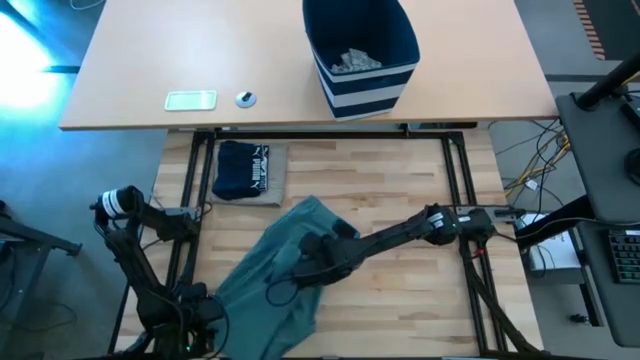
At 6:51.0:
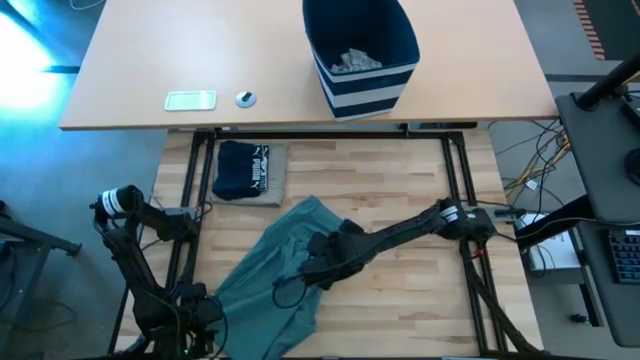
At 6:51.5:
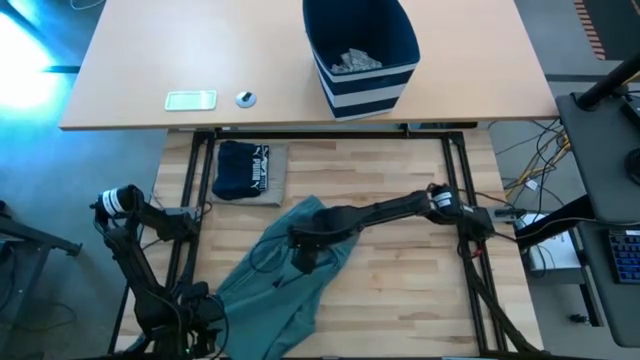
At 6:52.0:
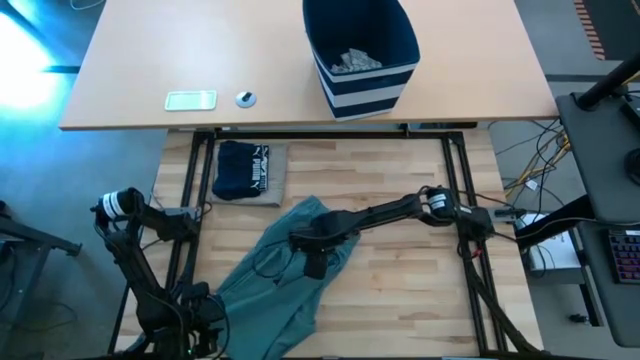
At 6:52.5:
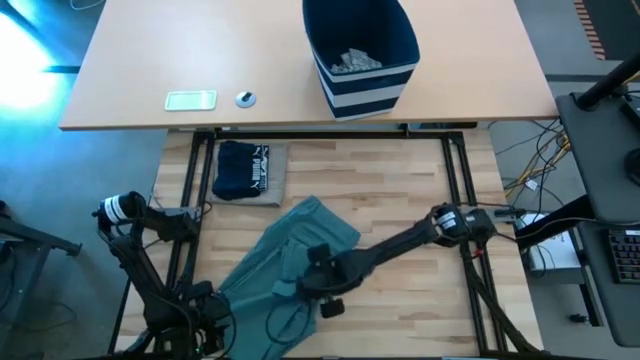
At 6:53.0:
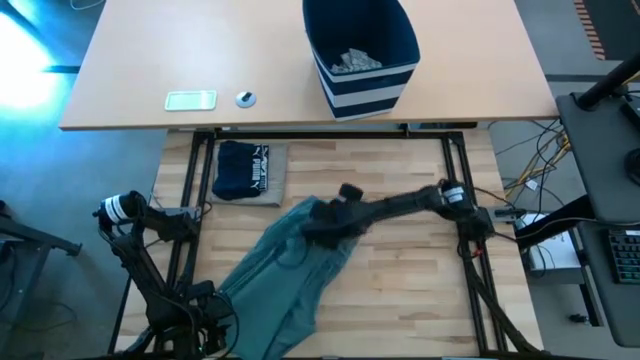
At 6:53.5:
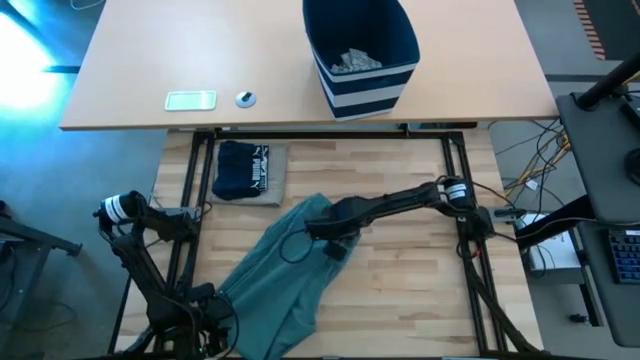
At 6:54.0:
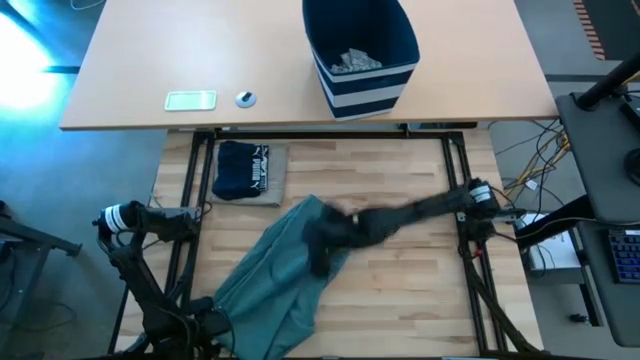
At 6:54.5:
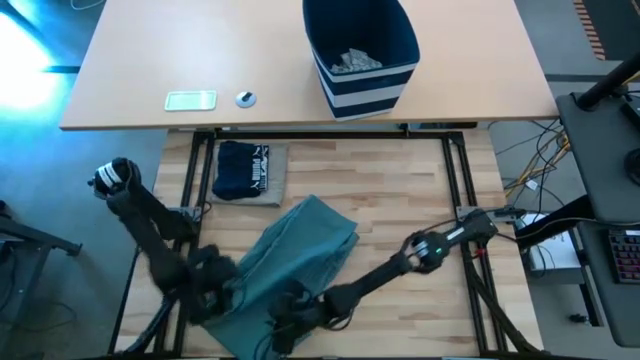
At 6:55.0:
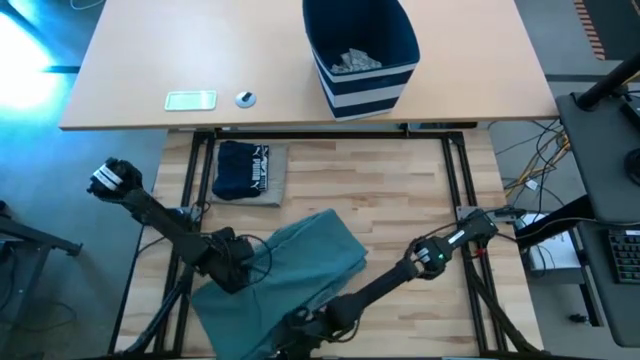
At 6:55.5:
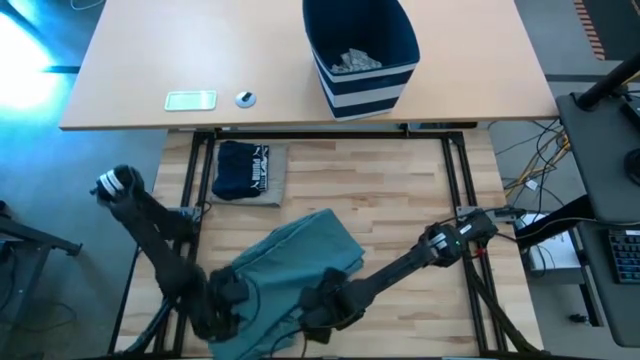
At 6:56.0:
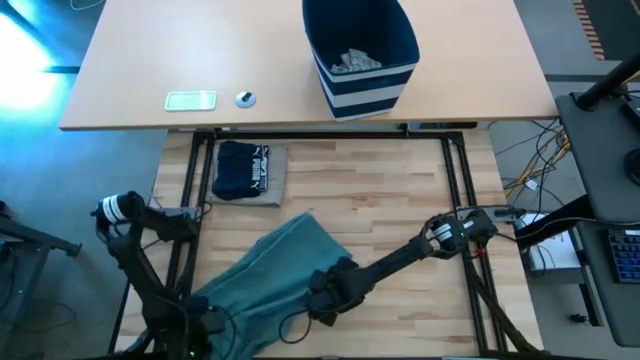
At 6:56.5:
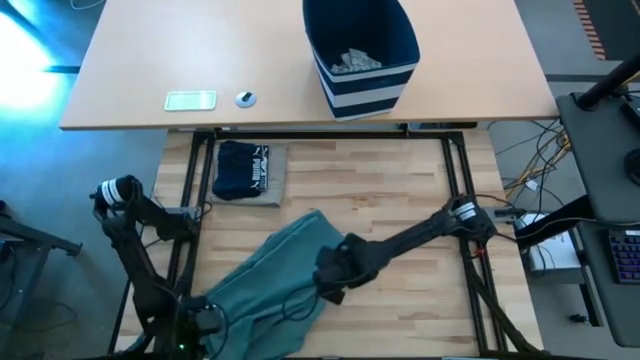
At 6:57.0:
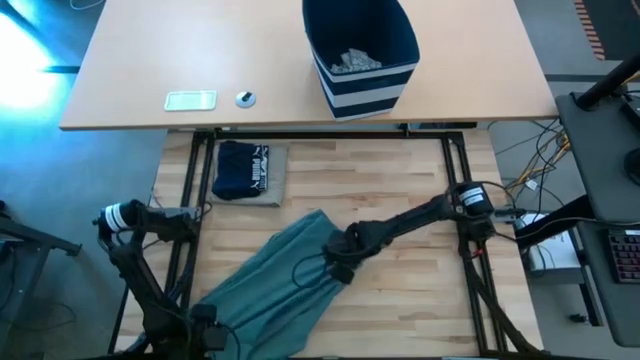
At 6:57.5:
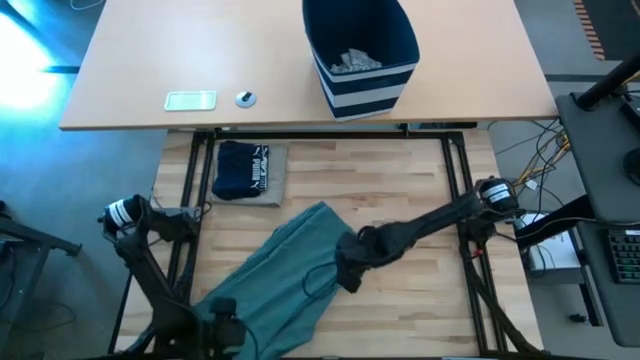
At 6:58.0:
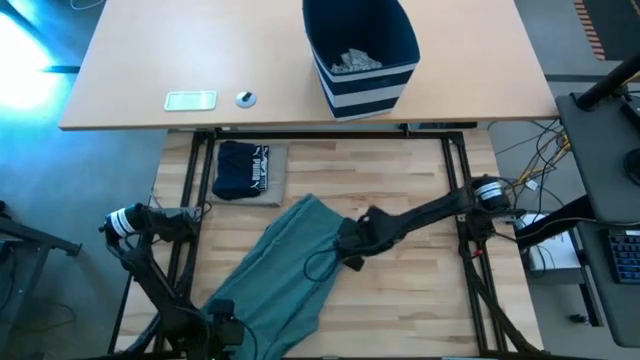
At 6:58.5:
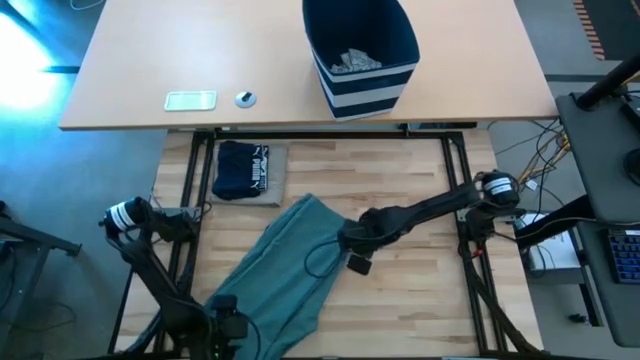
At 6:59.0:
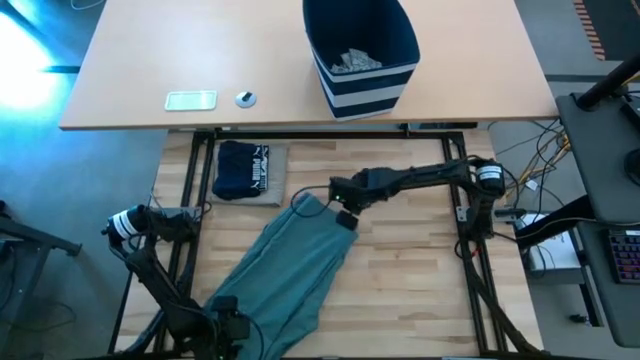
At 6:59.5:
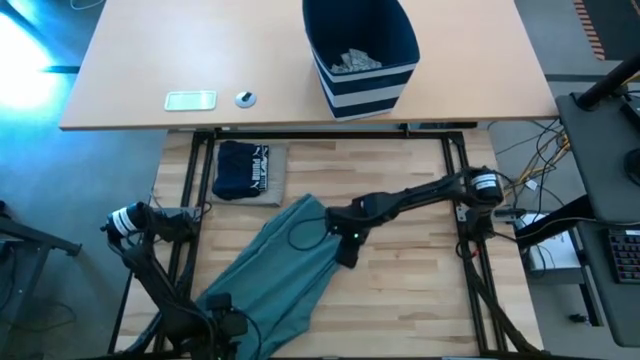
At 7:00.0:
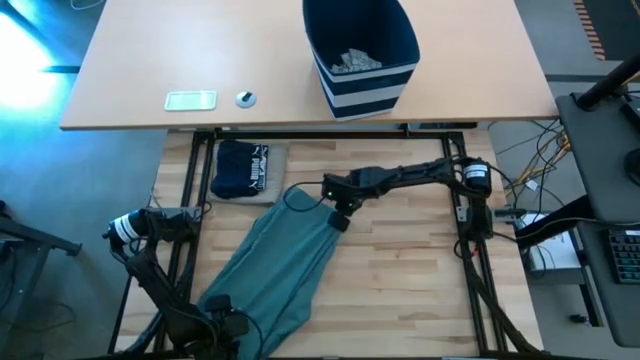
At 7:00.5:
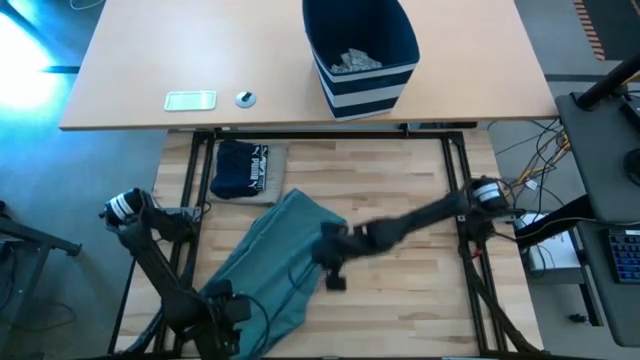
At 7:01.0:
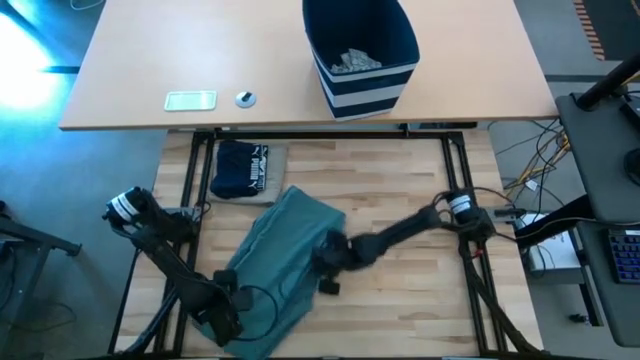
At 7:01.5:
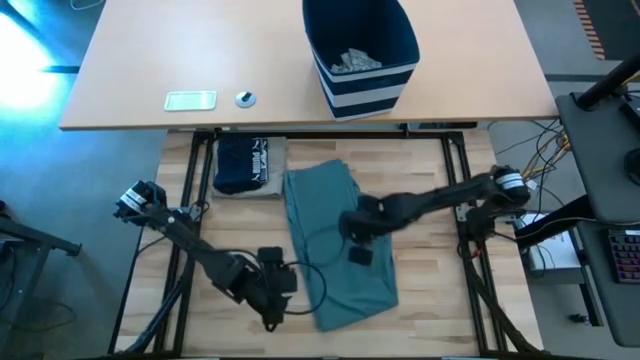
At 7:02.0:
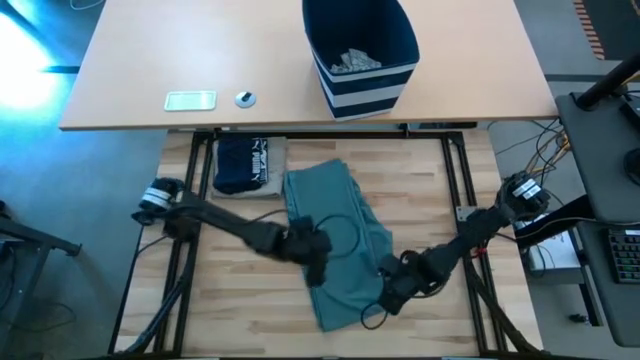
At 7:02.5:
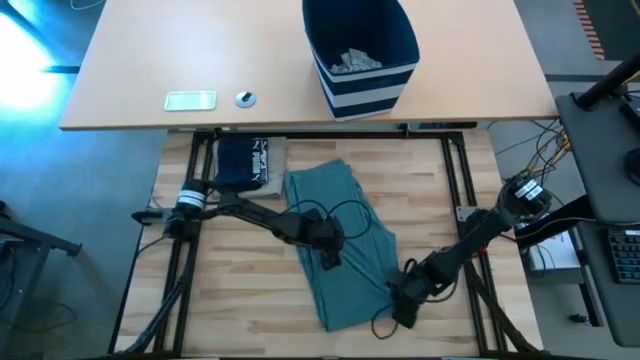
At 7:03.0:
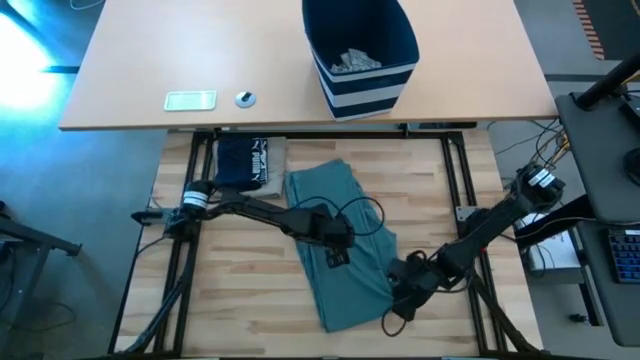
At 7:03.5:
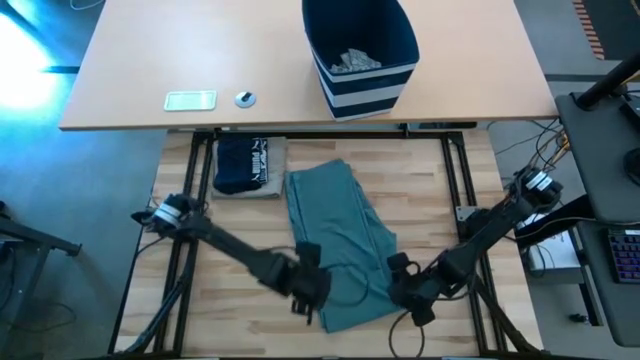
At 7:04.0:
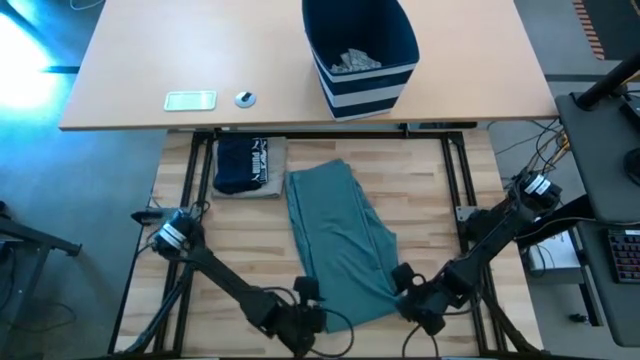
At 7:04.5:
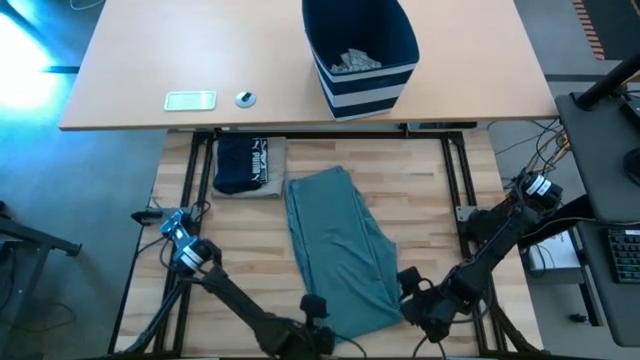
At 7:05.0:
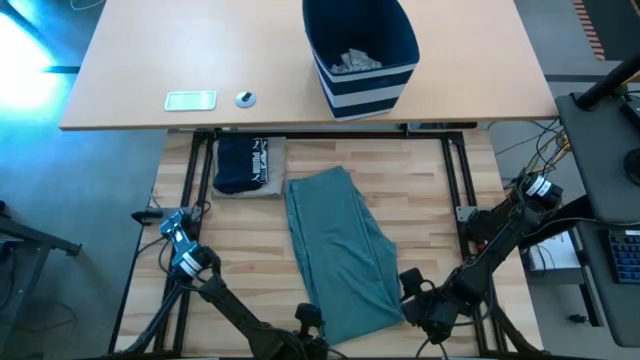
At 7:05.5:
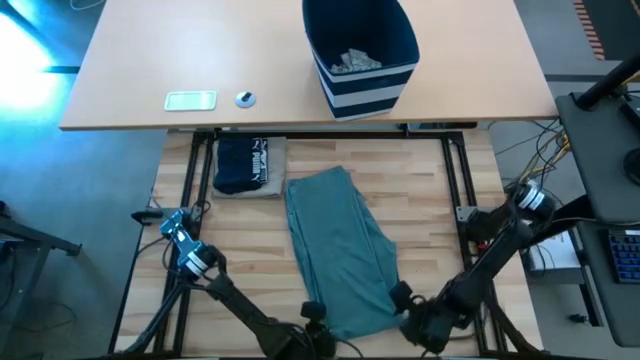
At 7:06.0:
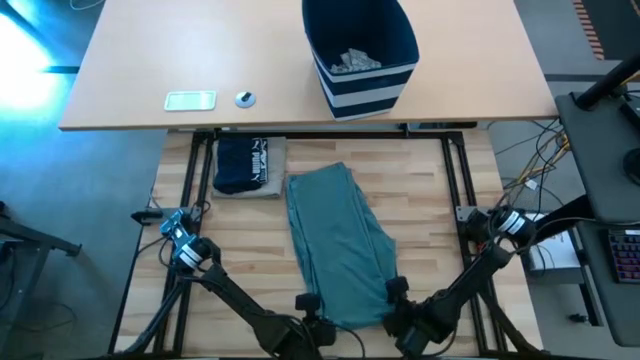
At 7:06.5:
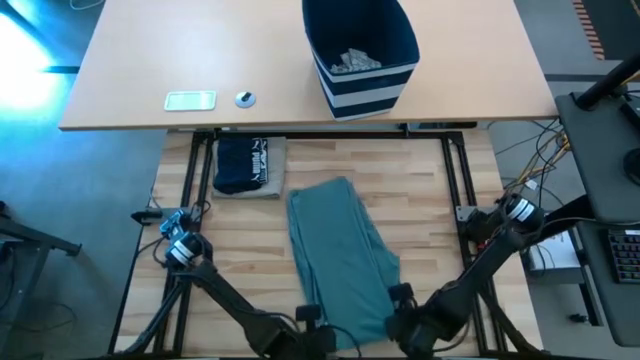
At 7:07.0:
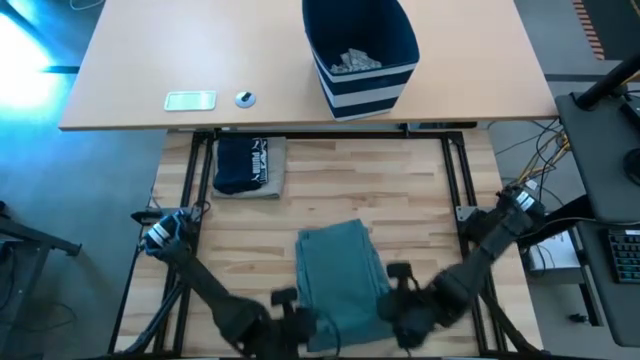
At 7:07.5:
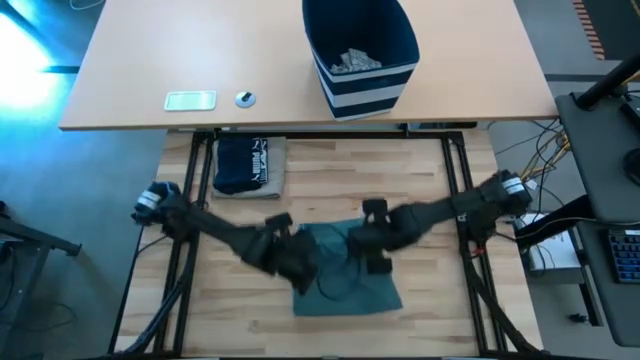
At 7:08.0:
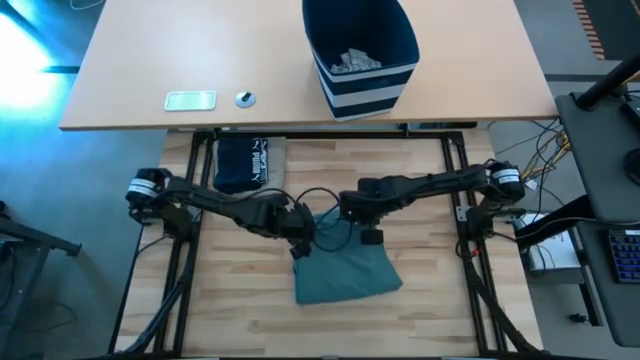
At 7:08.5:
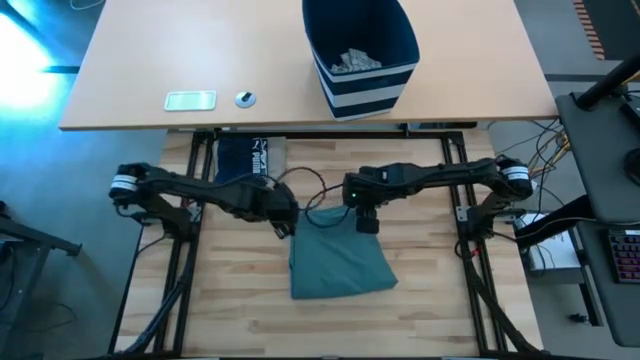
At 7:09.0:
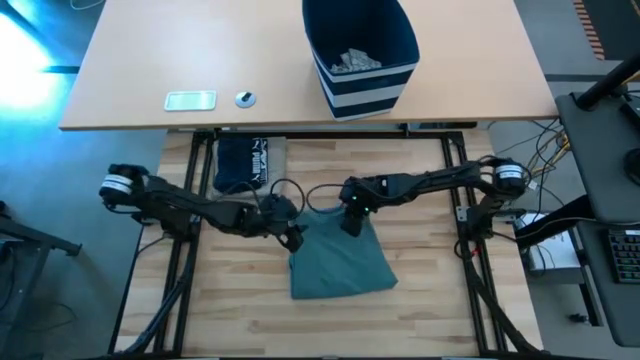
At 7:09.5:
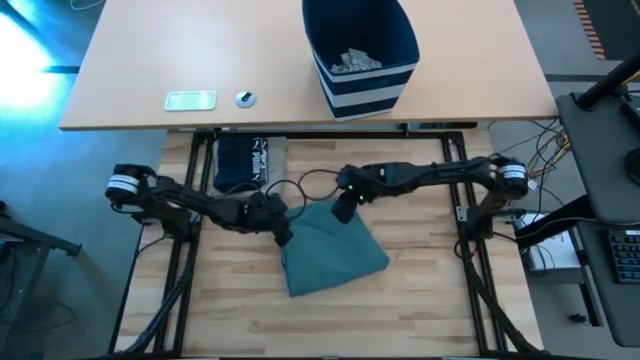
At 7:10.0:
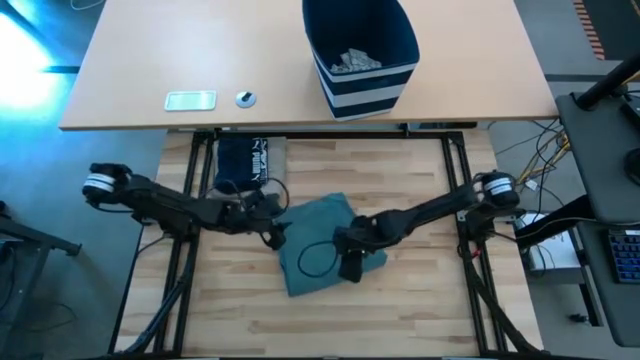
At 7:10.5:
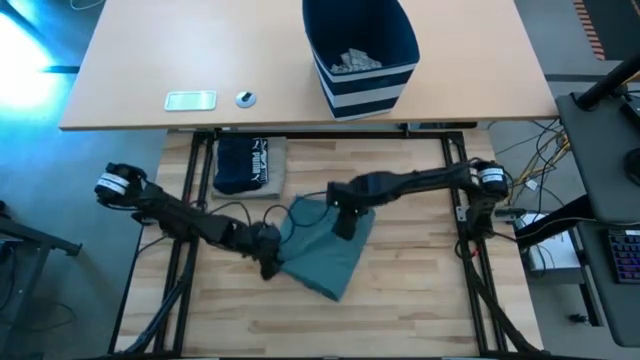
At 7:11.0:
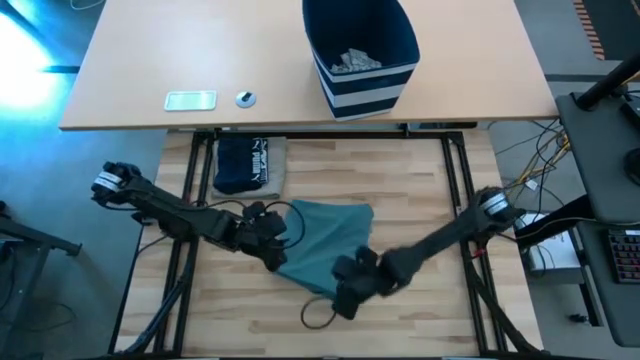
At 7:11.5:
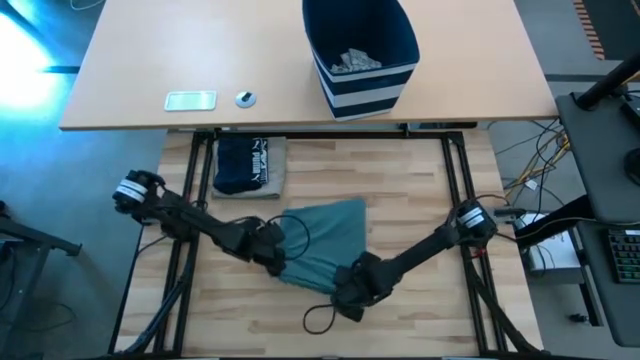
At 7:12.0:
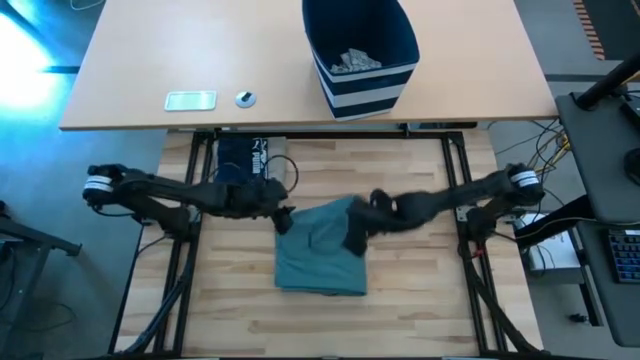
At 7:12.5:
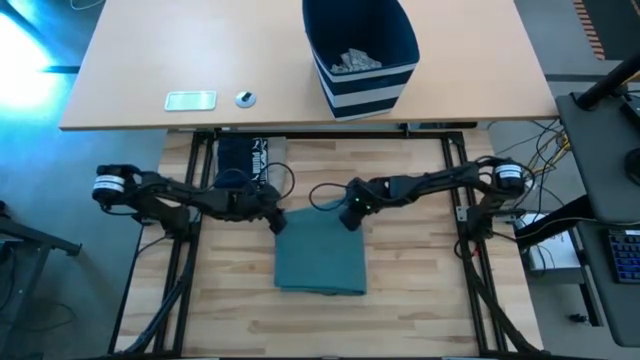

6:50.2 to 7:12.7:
Task: Fold Laundry from Bin
Fold the gray pants
